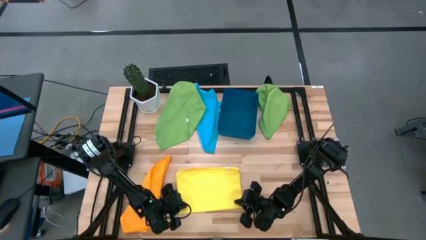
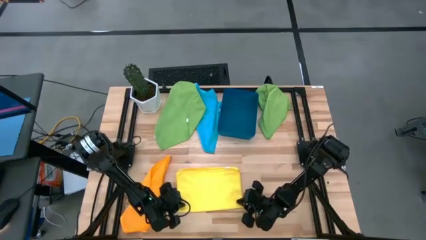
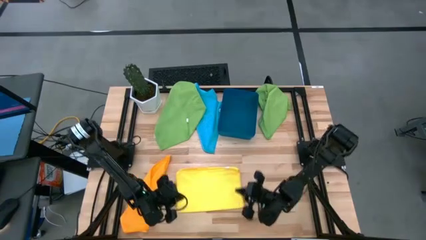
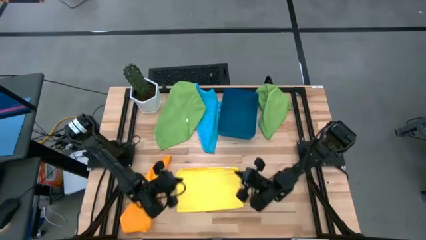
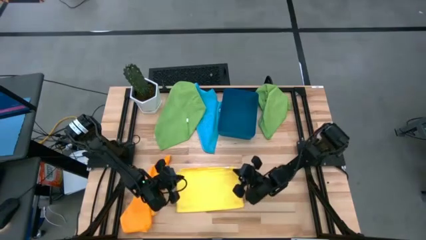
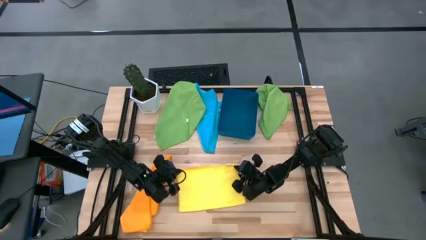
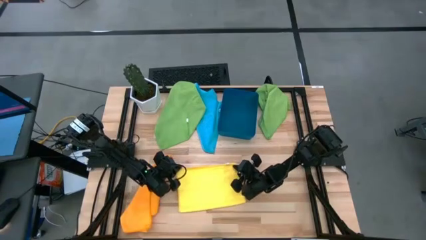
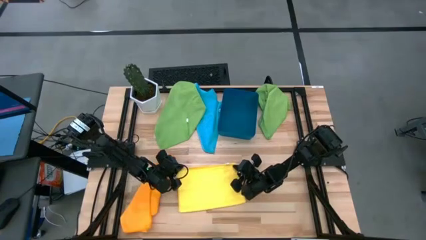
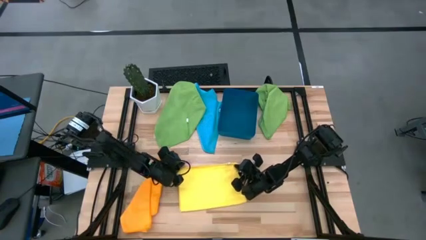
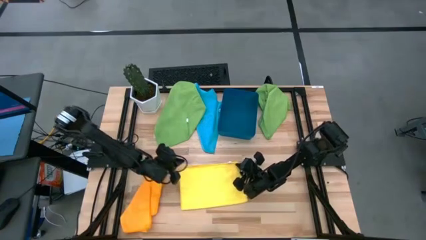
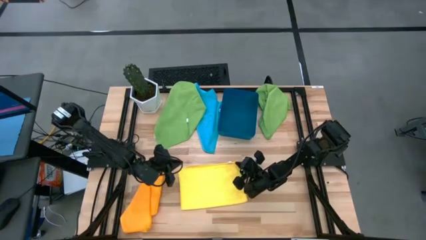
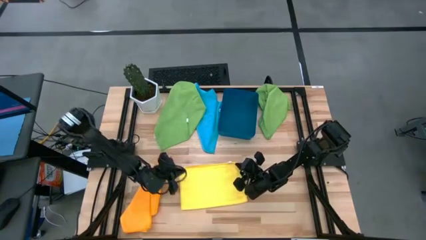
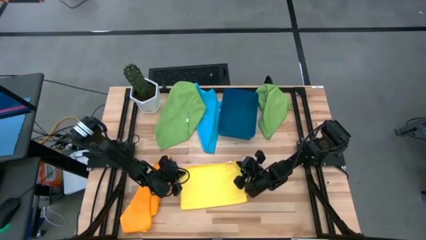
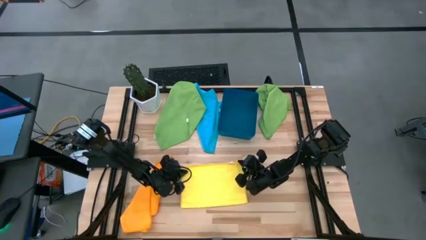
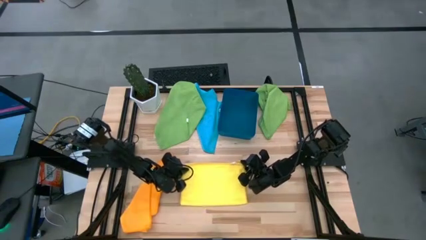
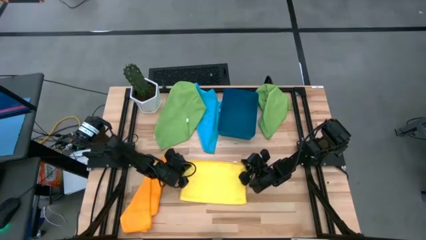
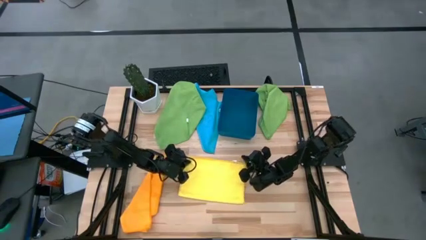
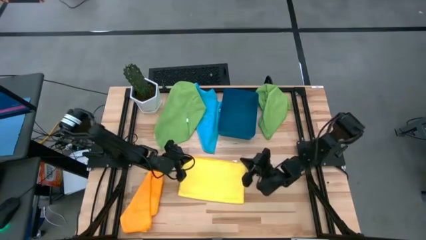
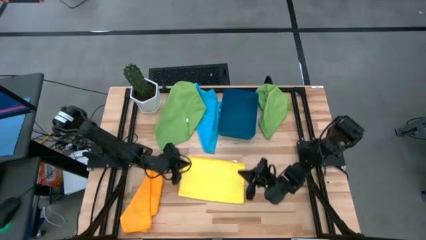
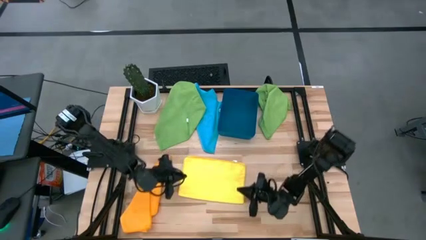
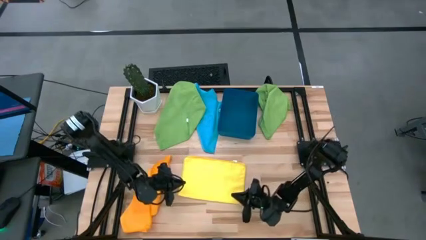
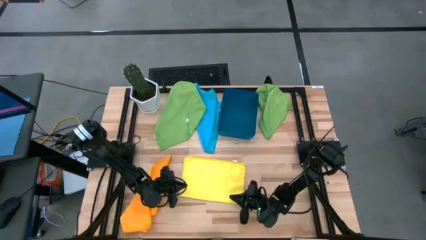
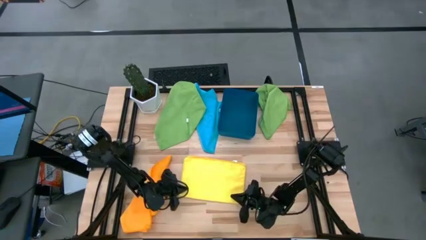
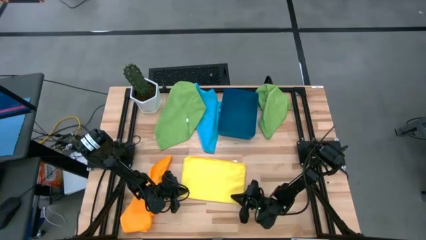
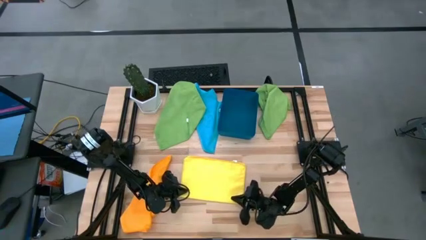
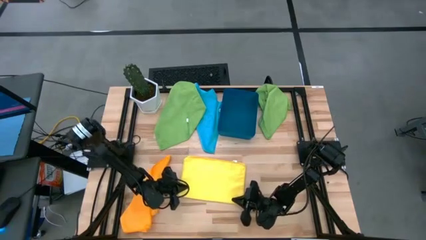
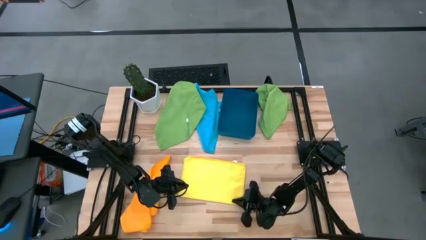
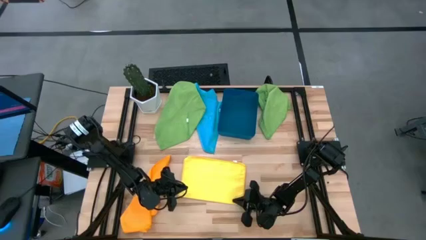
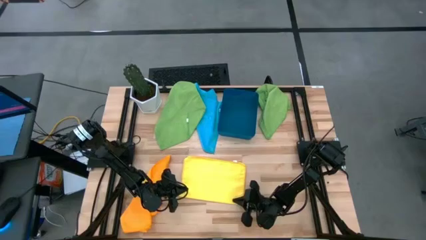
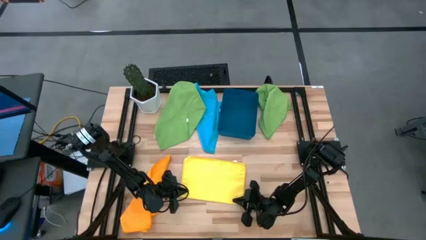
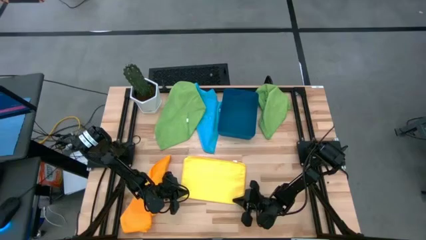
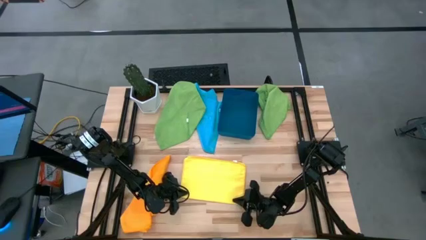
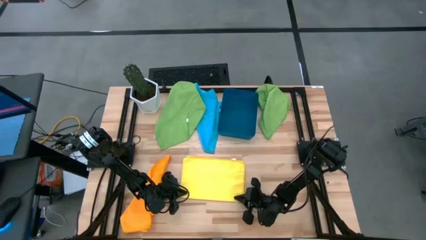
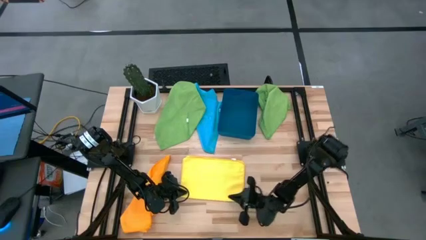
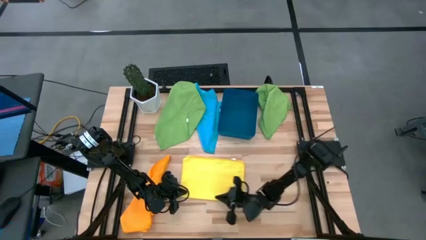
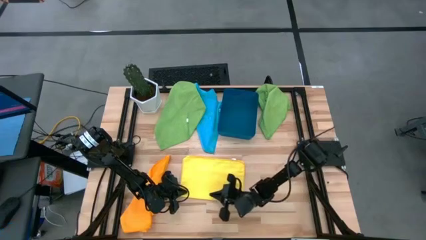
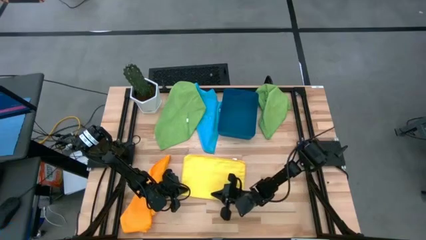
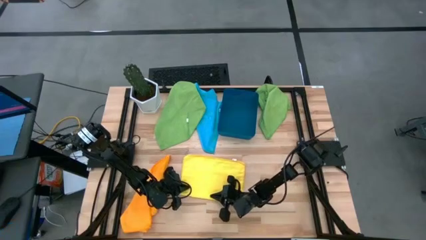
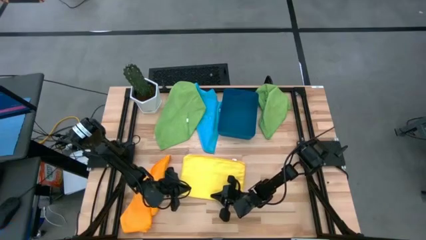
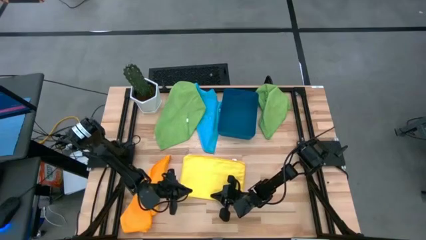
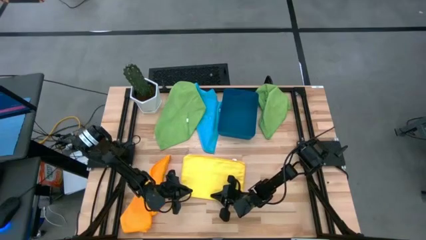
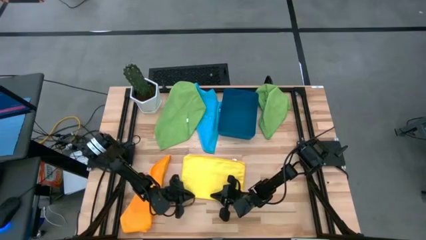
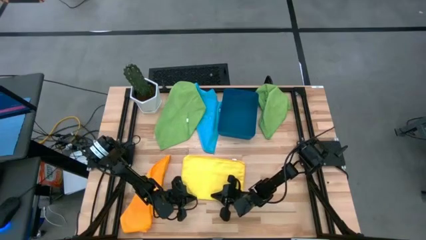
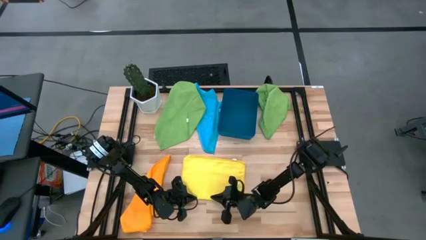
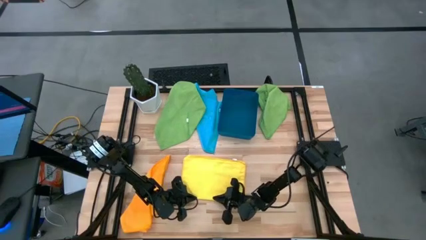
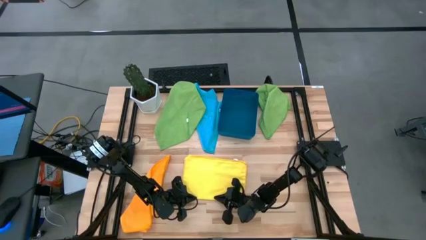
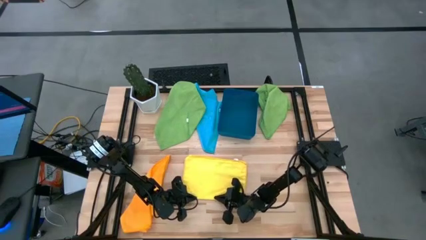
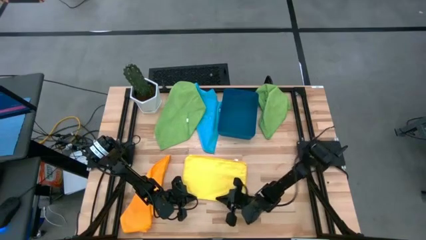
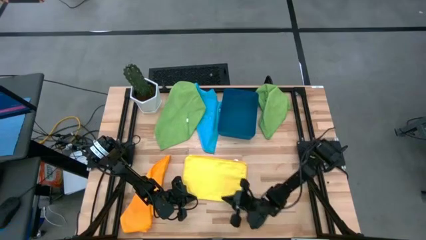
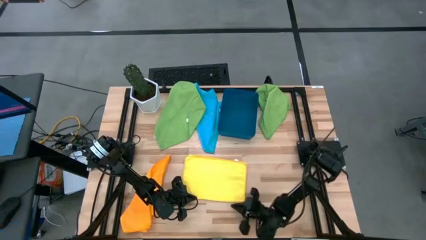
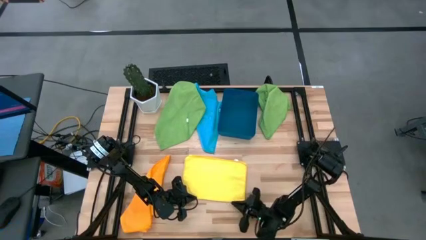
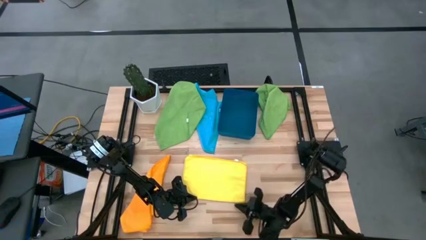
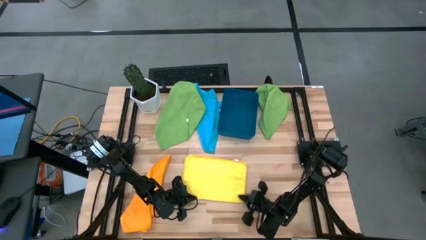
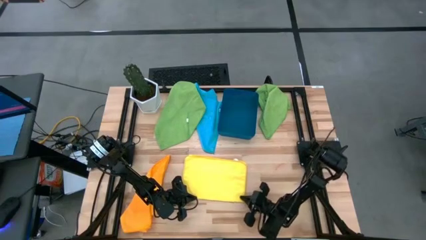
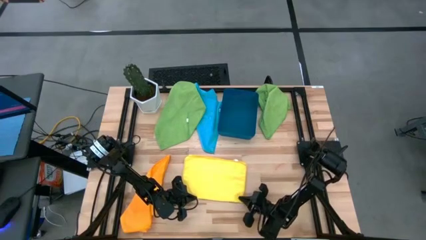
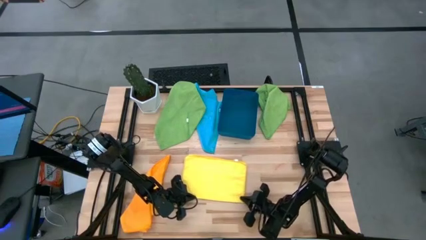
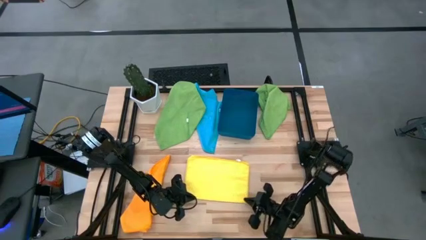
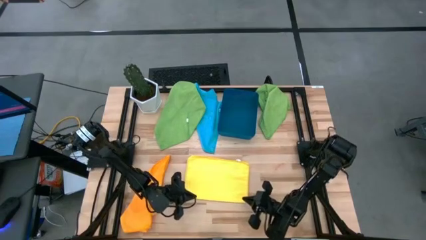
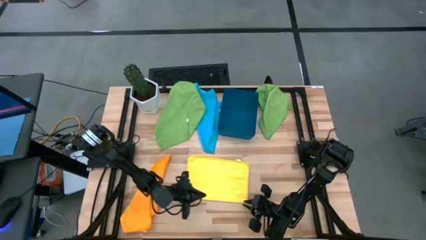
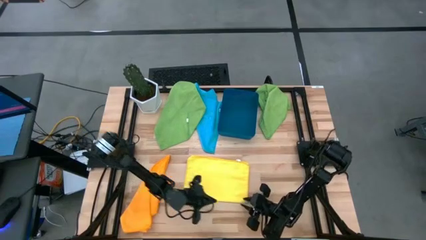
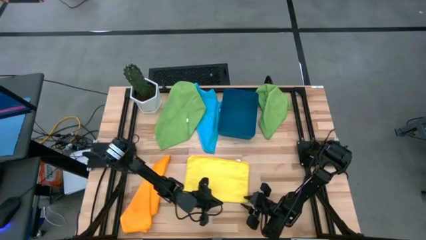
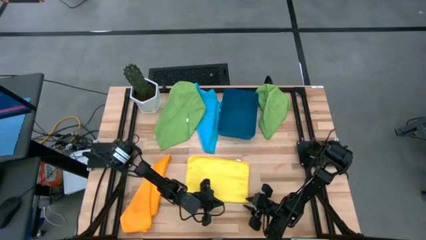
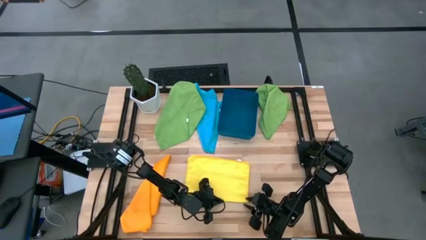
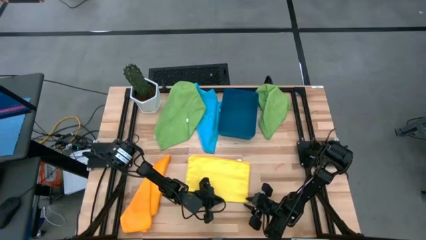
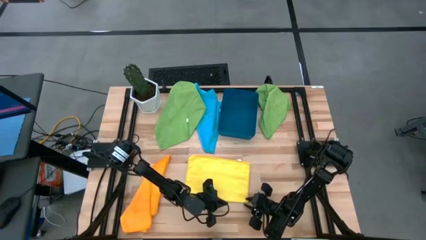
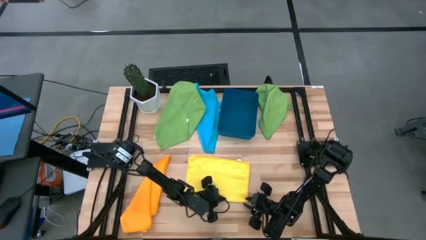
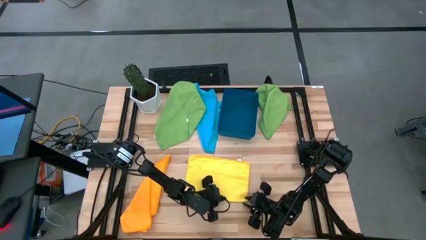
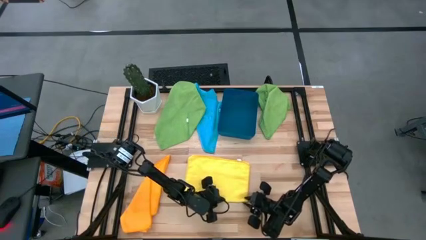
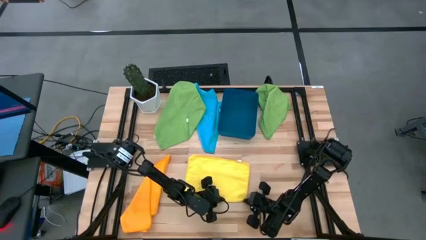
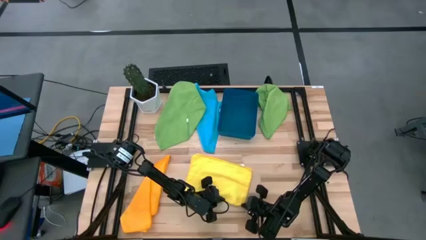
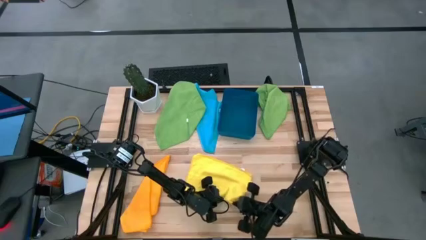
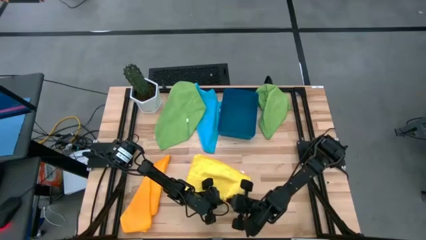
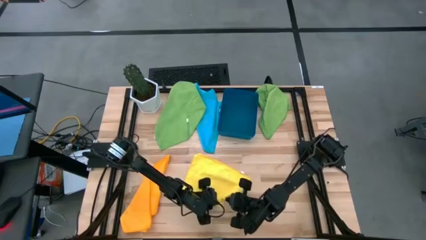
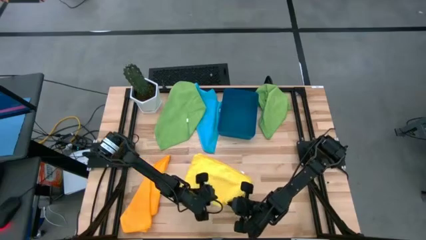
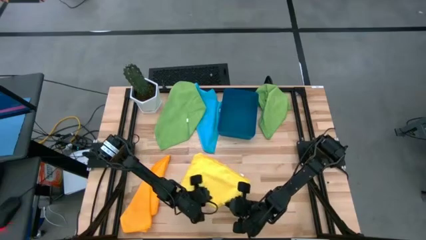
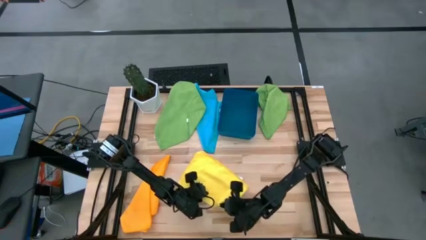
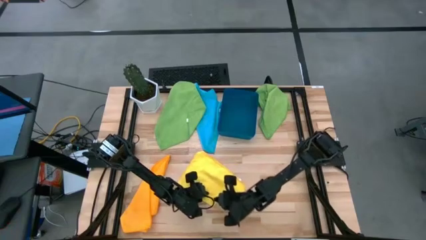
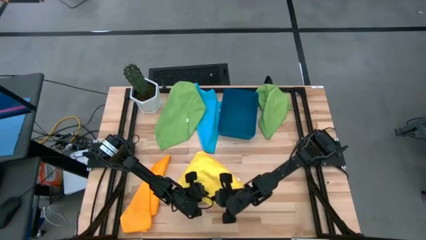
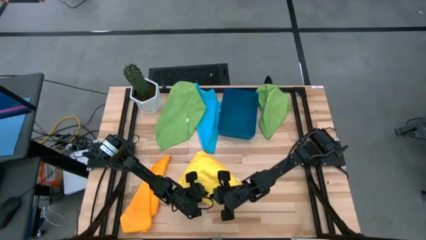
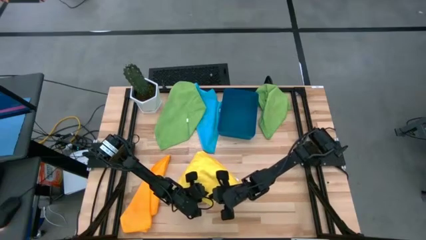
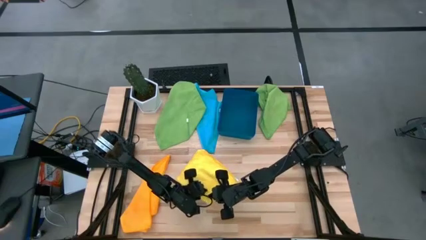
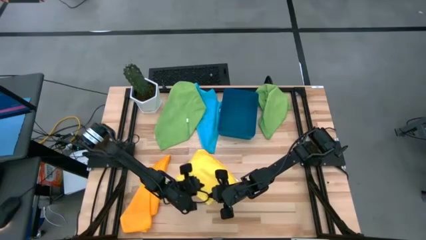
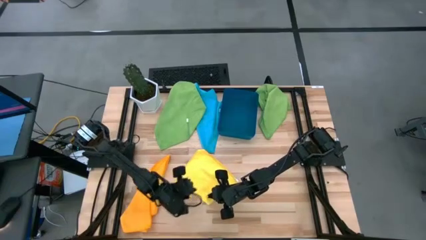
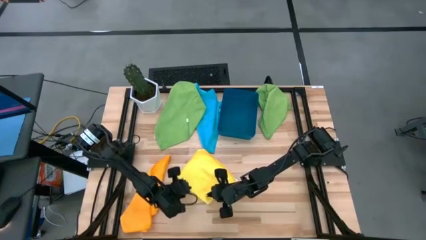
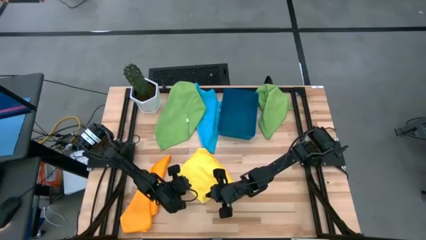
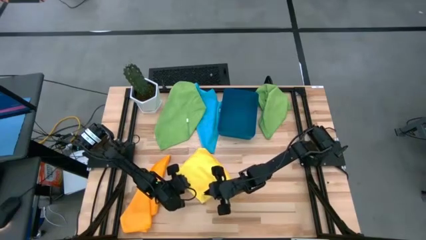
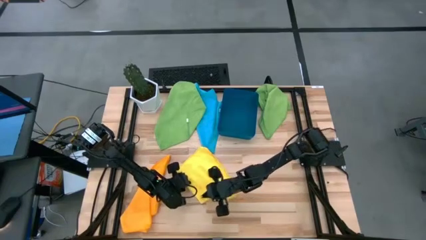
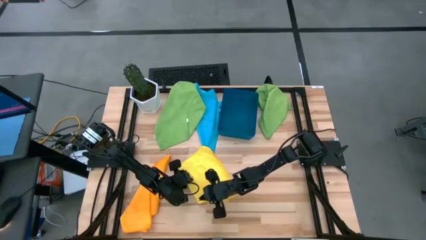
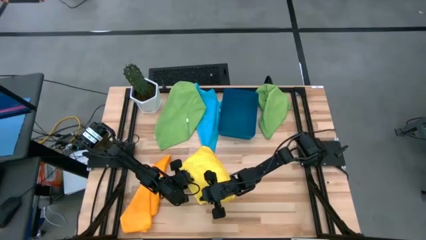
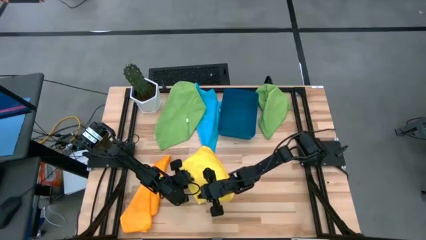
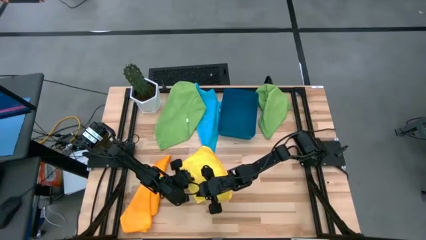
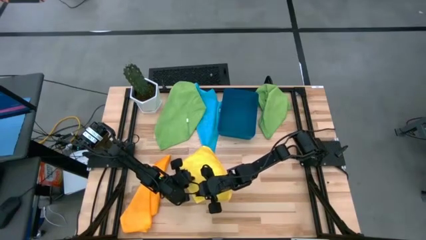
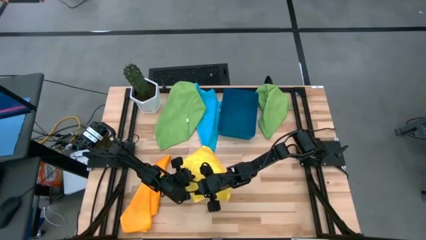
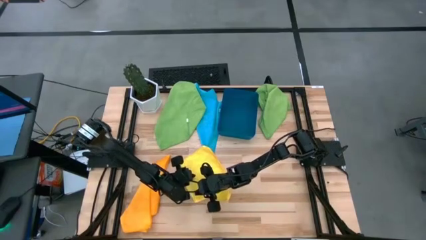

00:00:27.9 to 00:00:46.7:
Task: Fold microfiber towels
Fold the yellow towel
